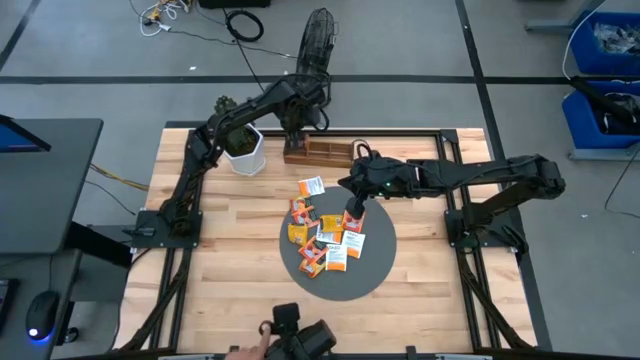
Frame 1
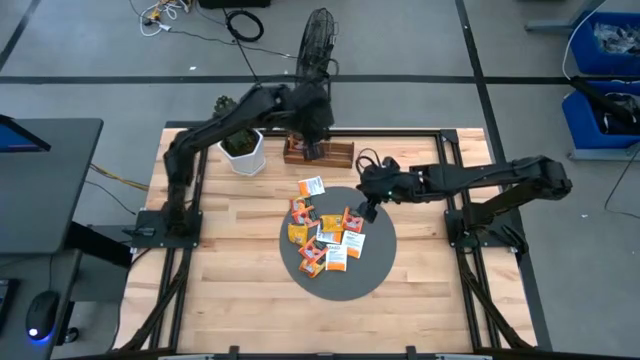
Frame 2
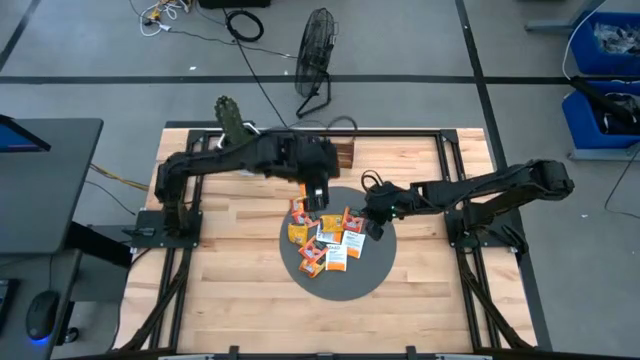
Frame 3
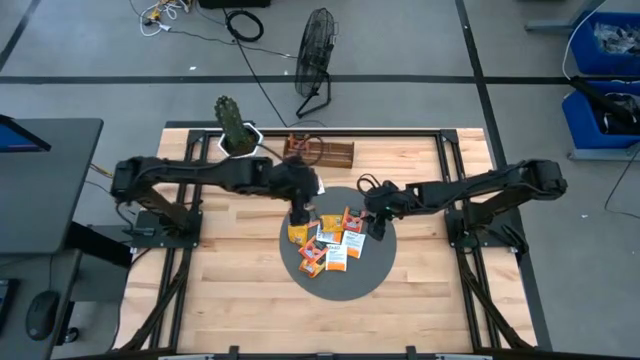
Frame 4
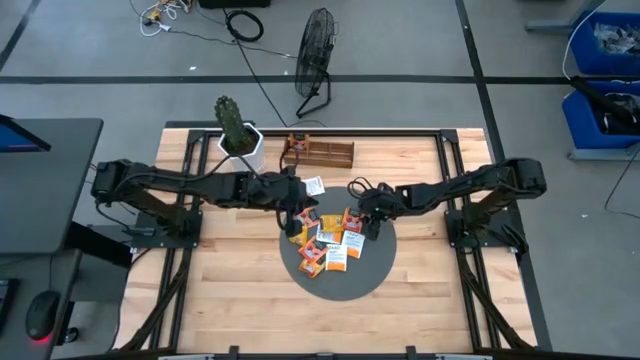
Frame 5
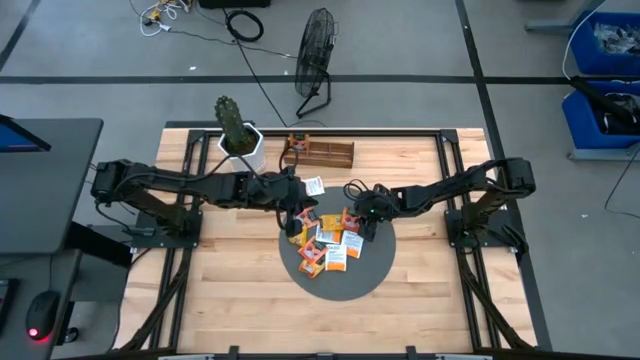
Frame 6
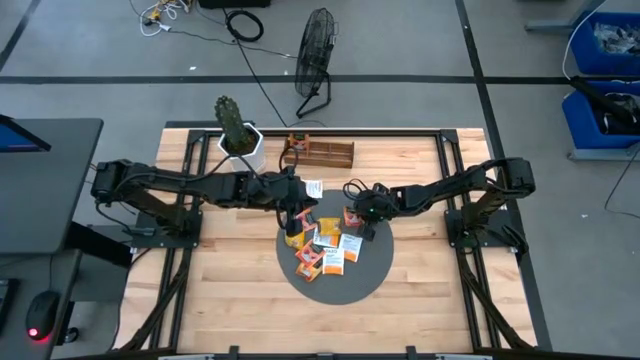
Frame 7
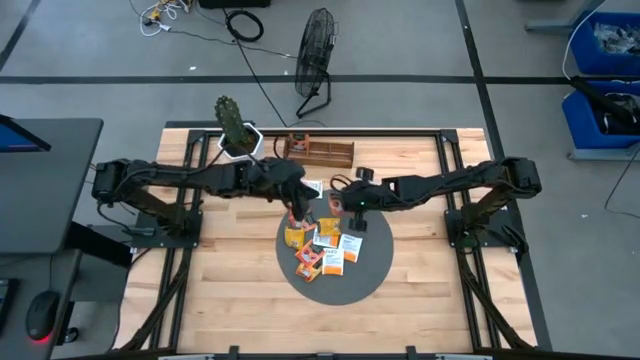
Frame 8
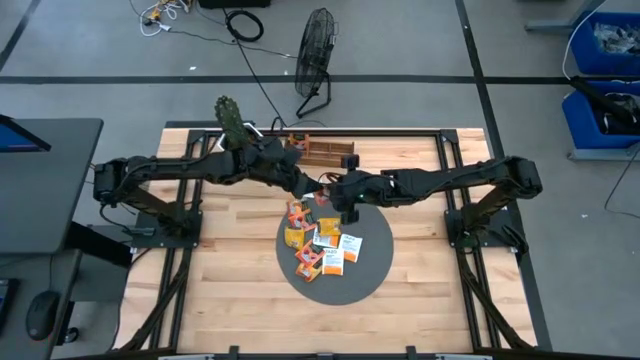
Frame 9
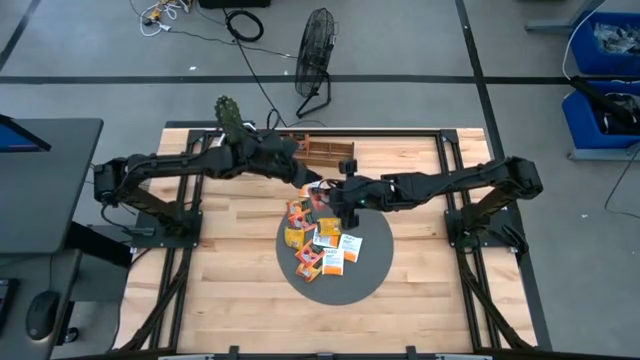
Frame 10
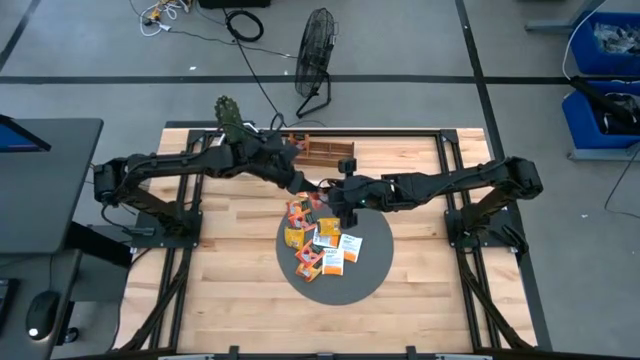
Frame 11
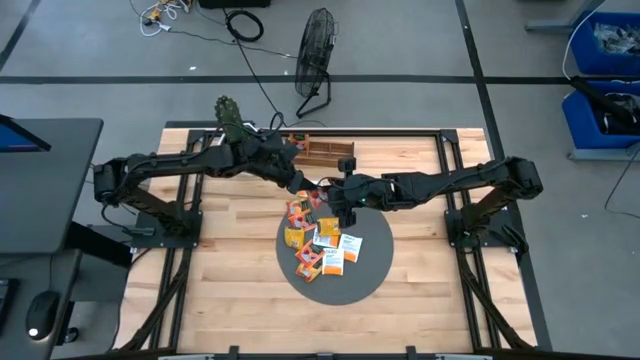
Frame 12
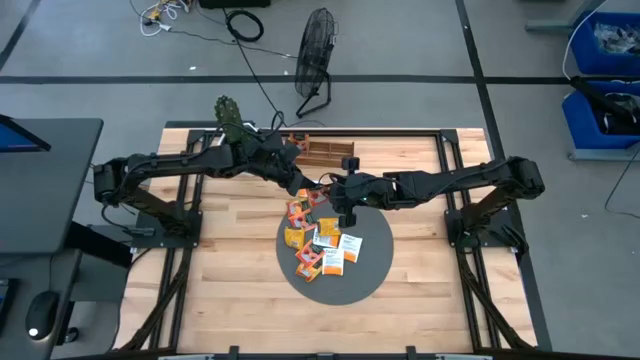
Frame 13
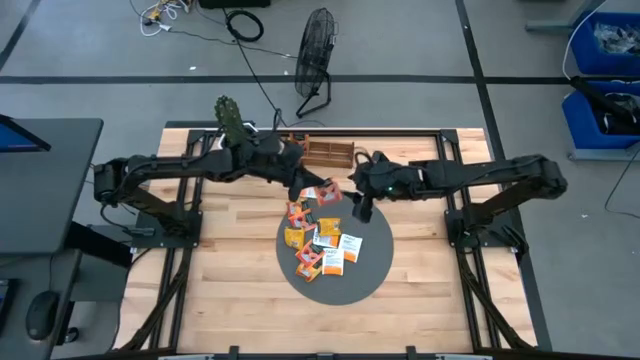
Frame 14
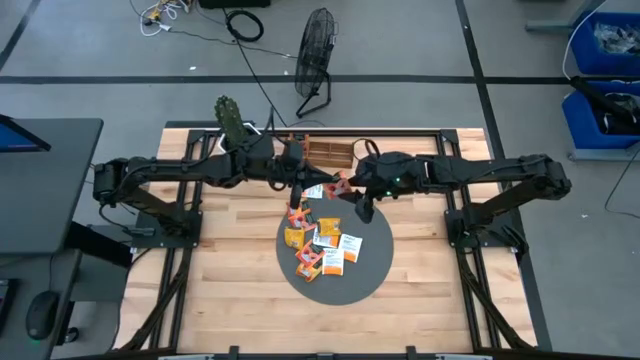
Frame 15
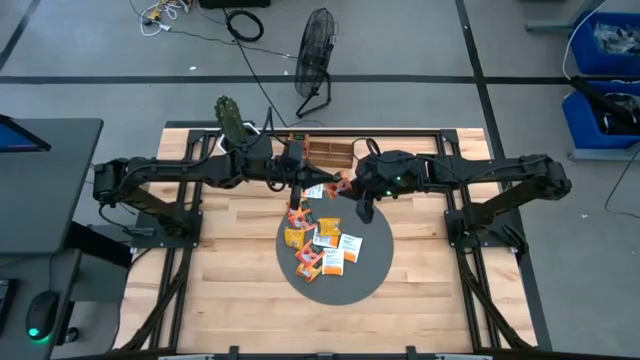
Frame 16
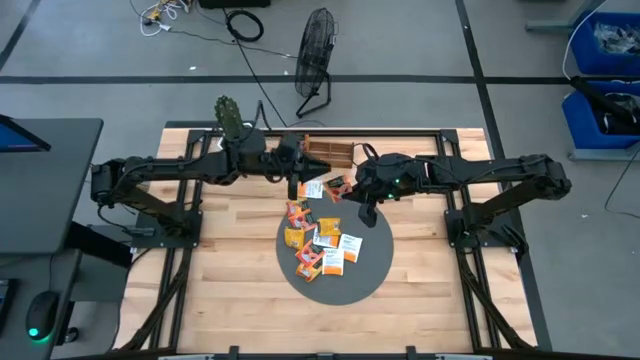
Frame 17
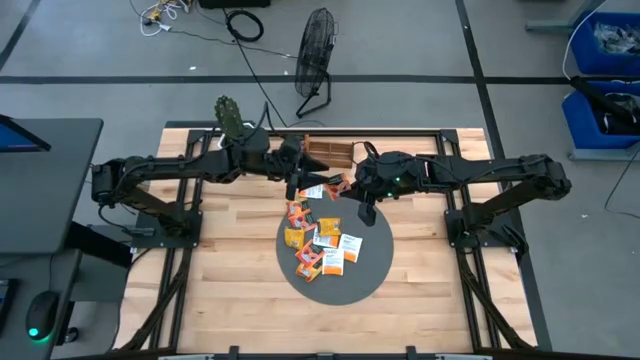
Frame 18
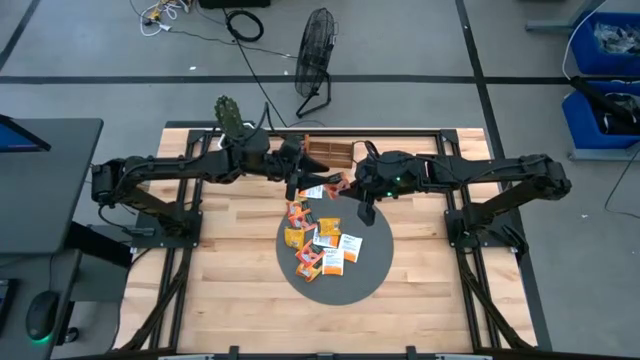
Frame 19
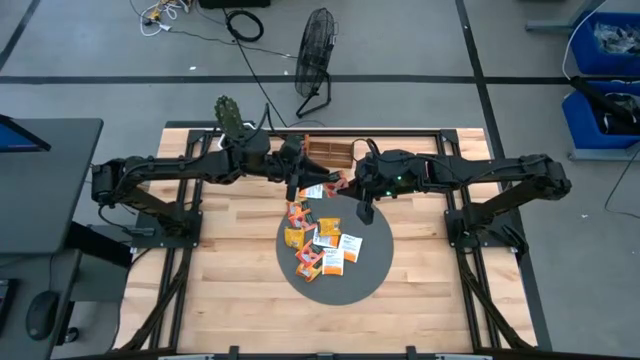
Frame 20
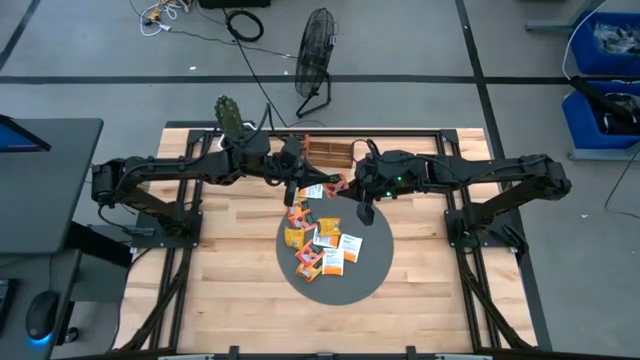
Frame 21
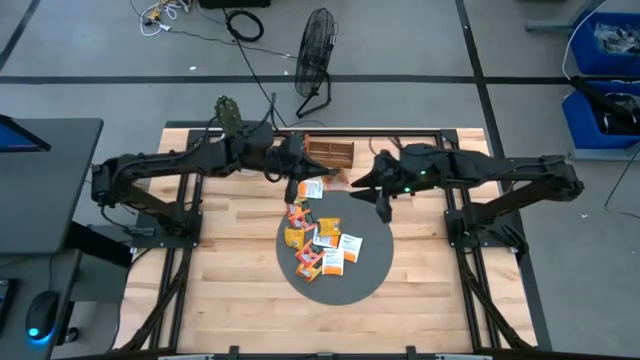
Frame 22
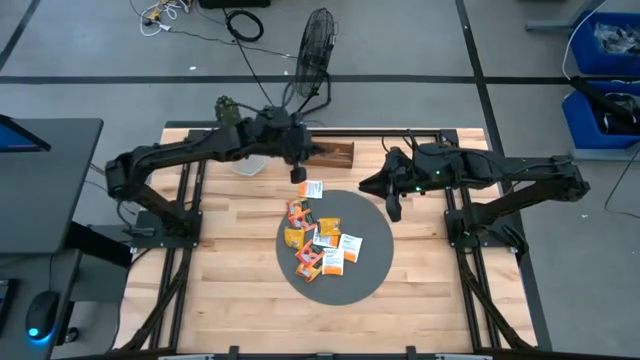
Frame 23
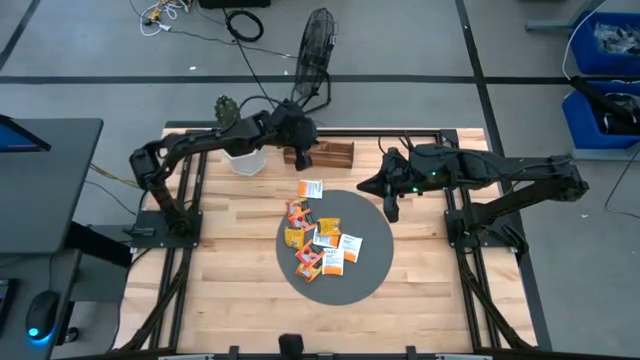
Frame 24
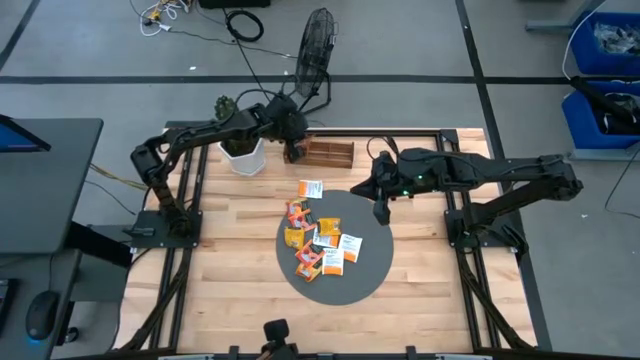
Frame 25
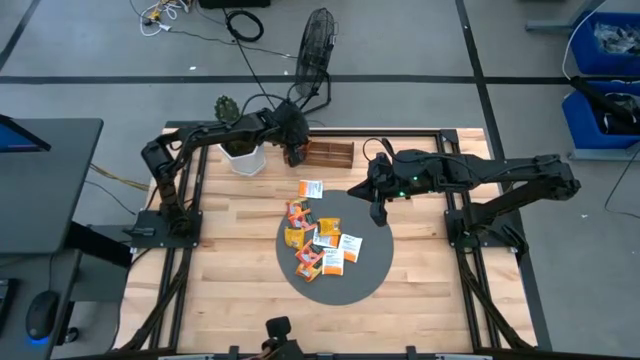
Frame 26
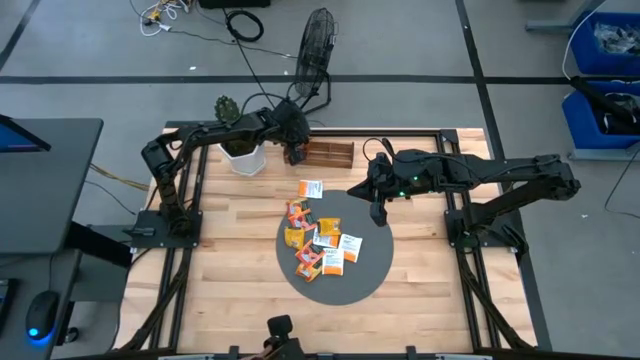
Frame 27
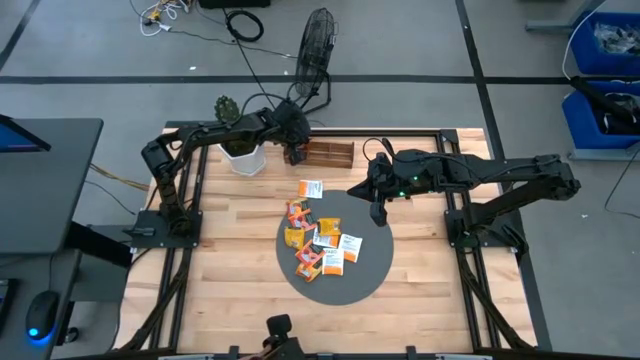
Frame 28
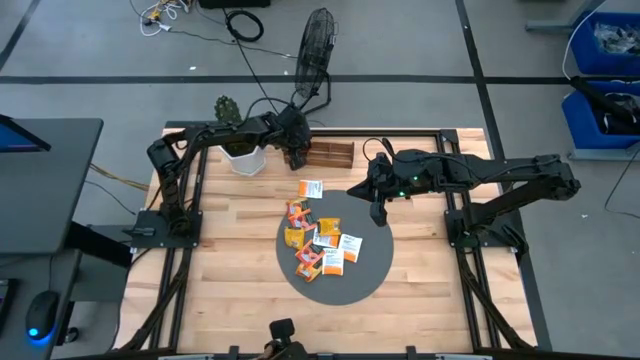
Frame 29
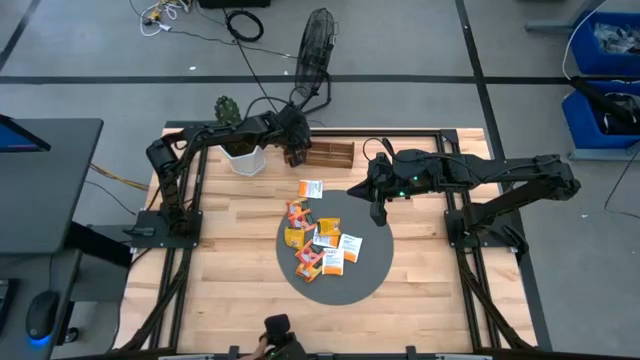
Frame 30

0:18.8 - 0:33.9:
Task: Pick & Place Tea
Put the orange tea bag into the left section of the wooden organizer

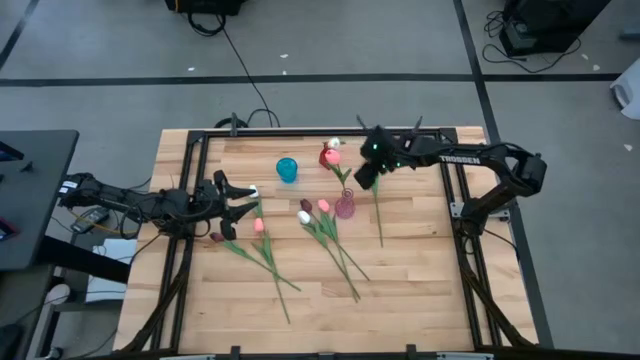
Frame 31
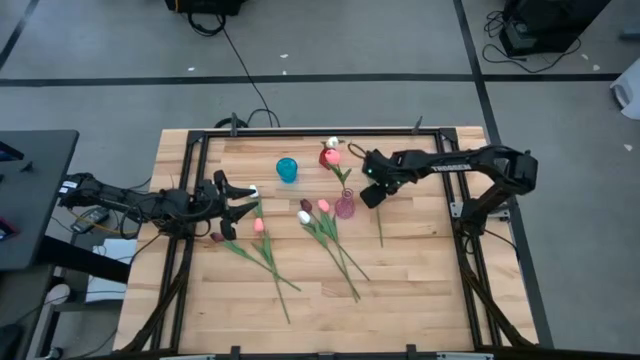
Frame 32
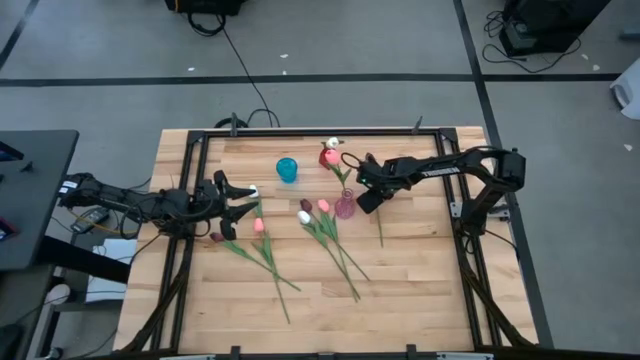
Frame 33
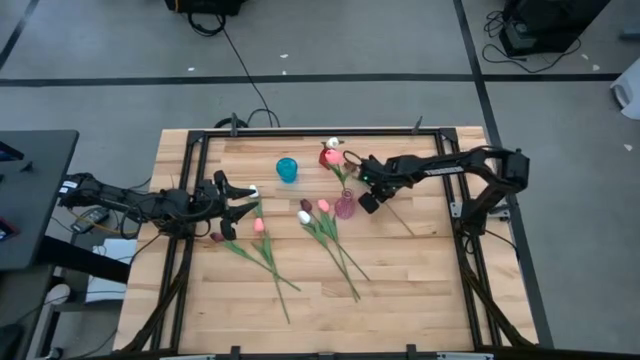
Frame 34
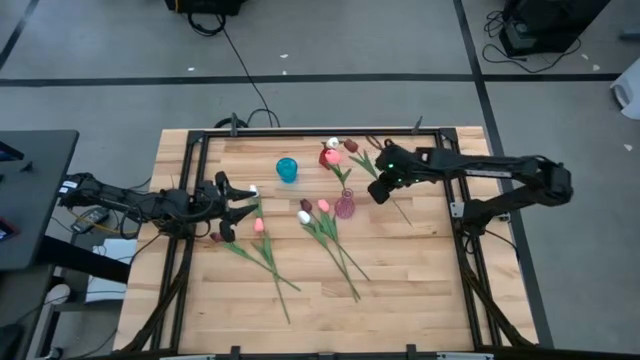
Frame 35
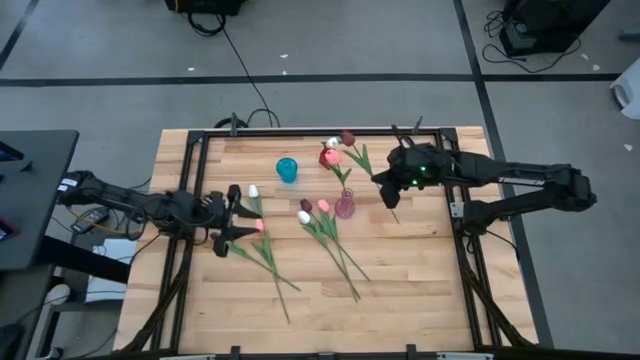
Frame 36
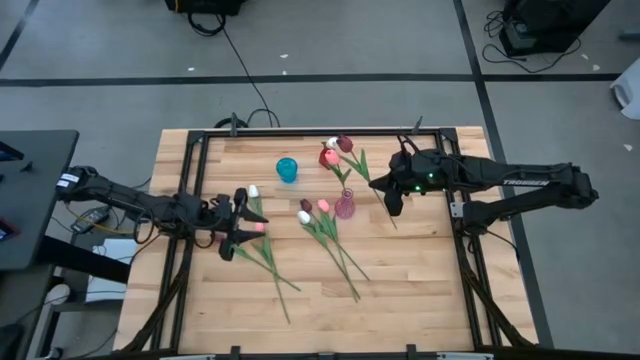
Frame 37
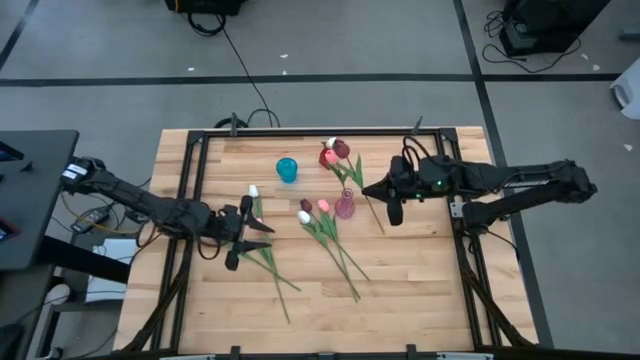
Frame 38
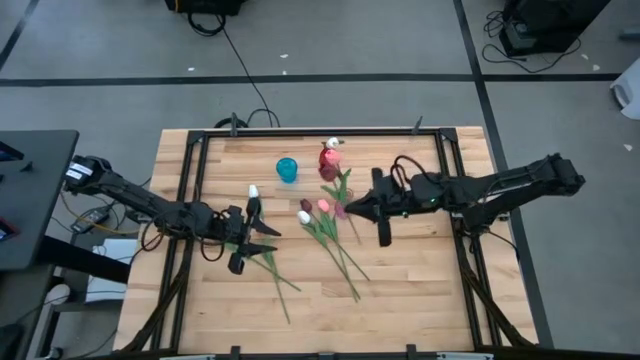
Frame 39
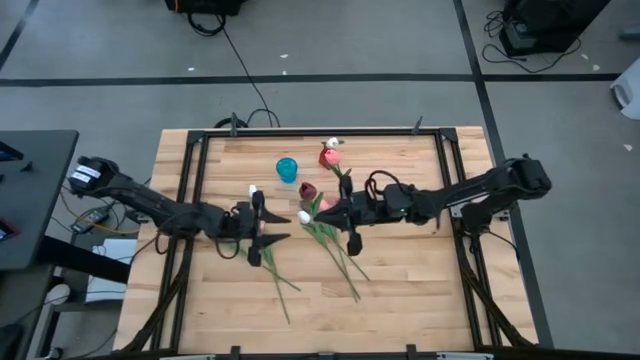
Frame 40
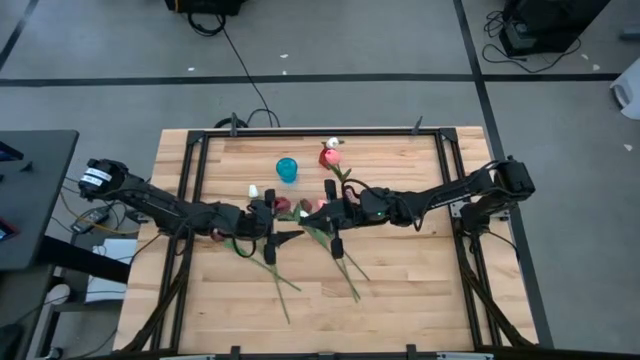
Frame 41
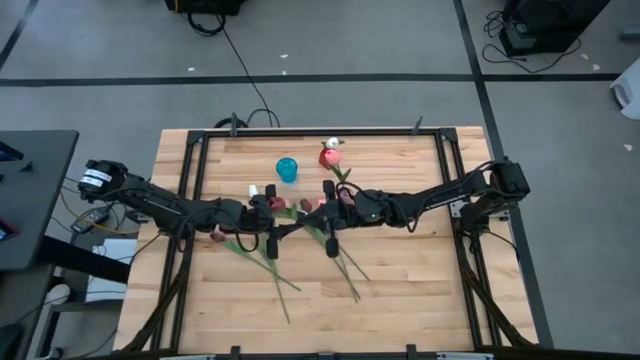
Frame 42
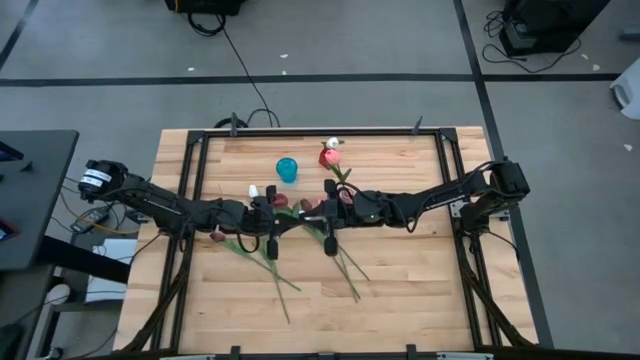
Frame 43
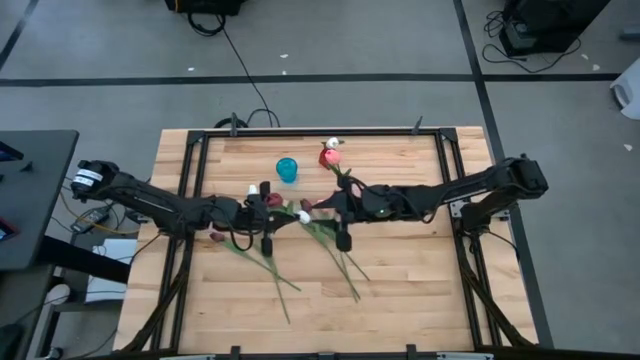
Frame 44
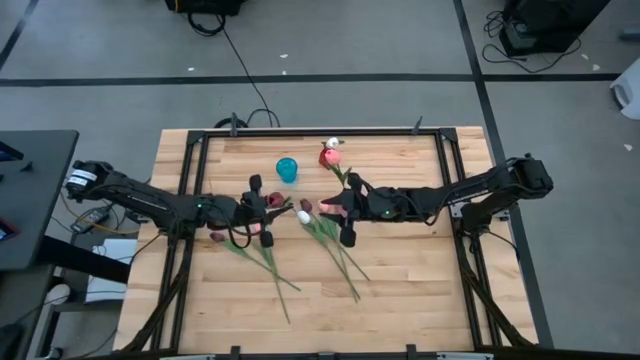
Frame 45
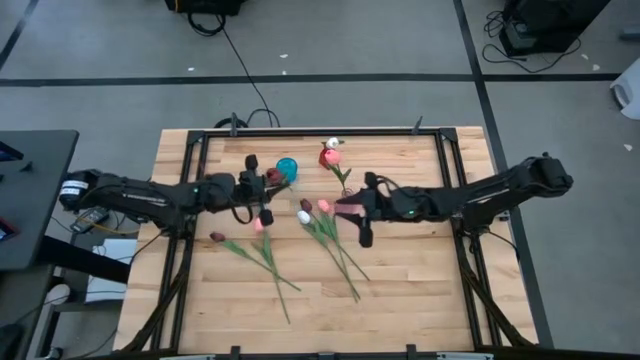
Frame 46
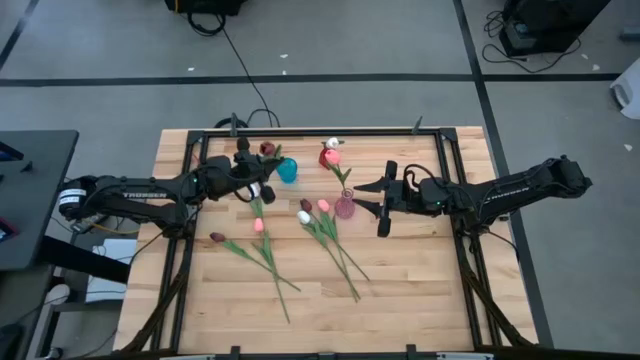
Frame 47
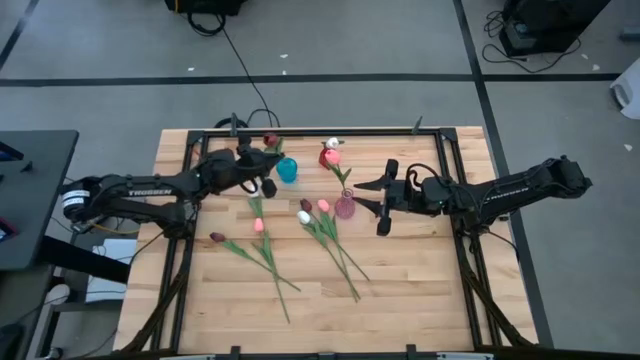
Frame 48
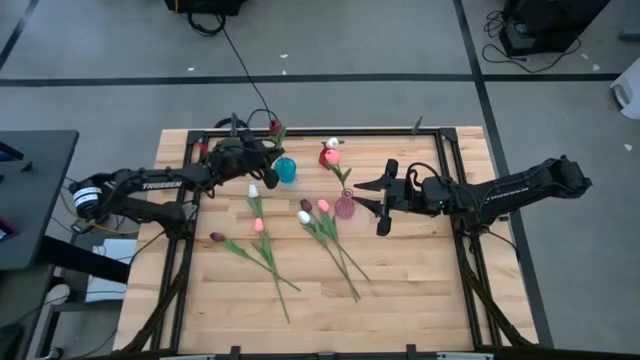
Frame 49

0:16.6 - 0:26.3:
Task: Sort flowers into vase by color
Put the top red tulip into the blue vase
